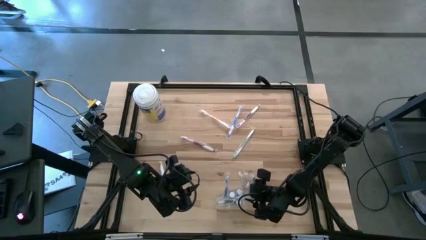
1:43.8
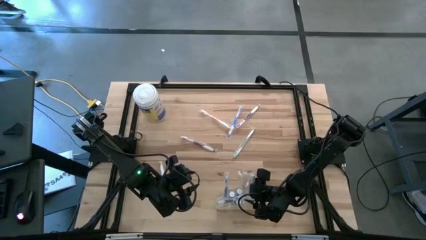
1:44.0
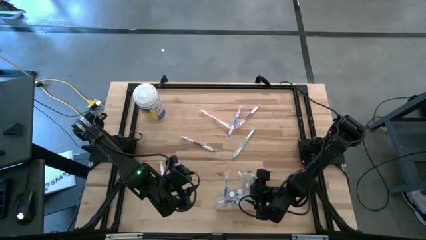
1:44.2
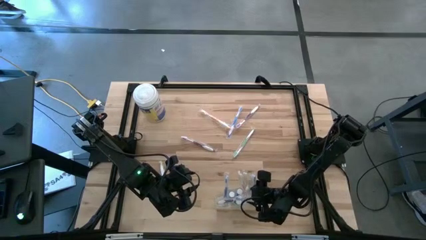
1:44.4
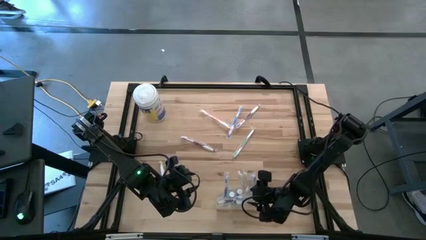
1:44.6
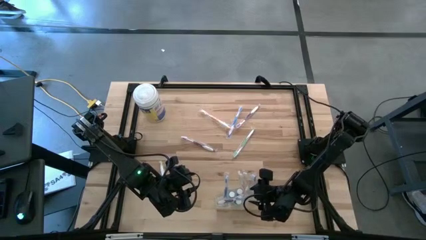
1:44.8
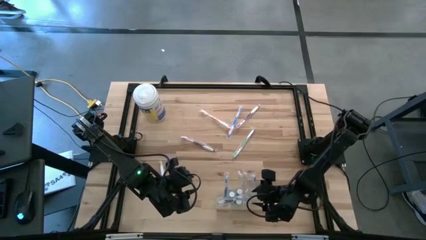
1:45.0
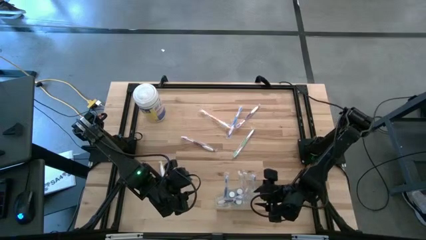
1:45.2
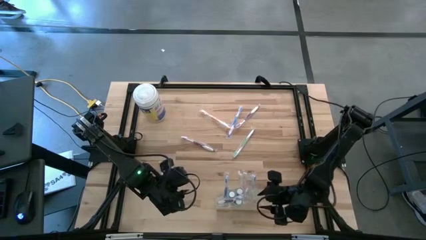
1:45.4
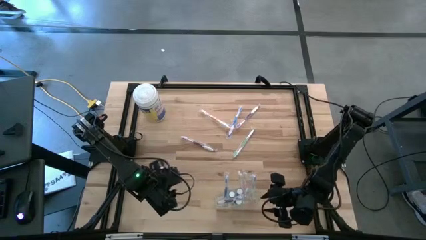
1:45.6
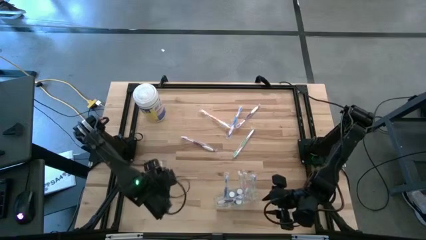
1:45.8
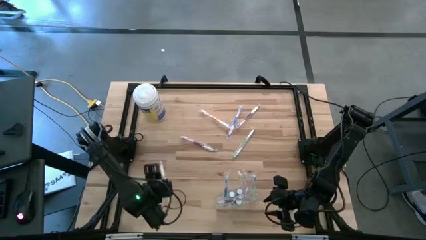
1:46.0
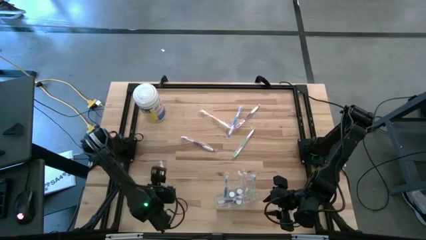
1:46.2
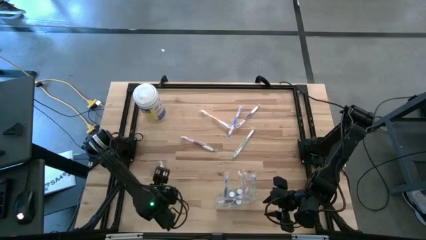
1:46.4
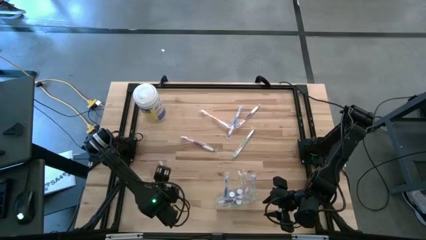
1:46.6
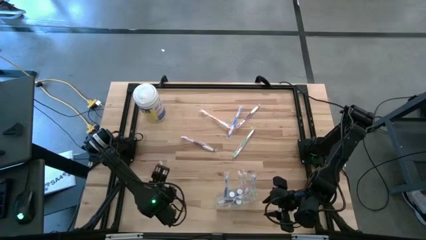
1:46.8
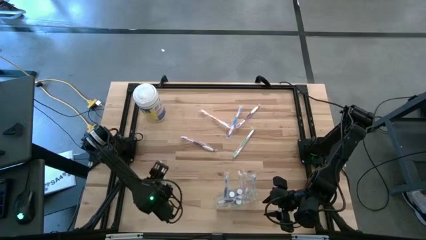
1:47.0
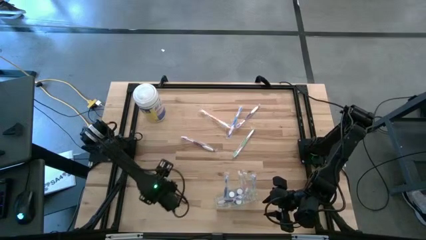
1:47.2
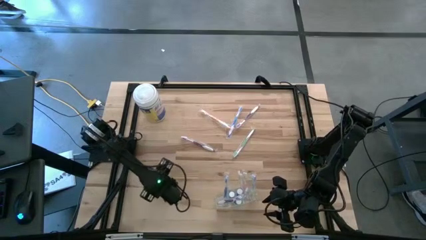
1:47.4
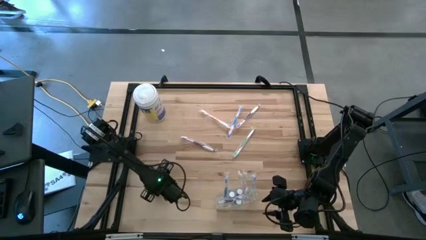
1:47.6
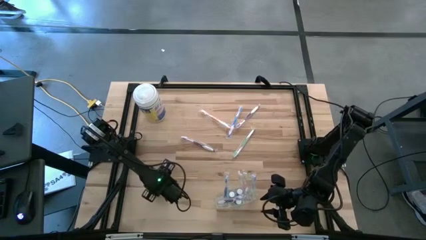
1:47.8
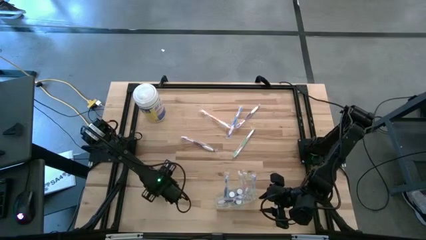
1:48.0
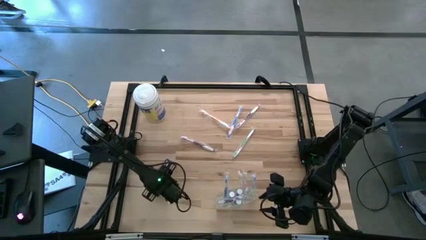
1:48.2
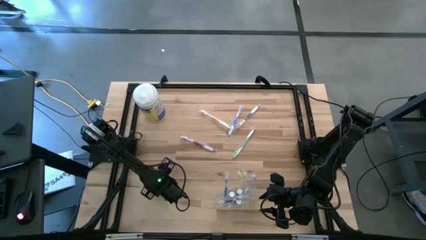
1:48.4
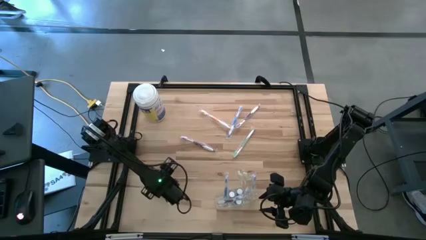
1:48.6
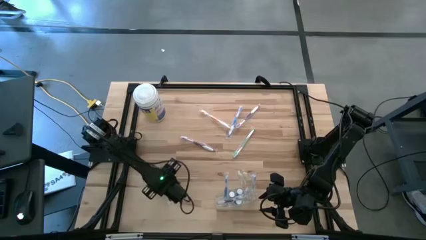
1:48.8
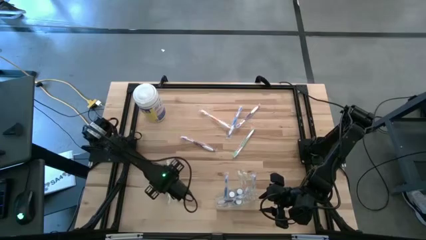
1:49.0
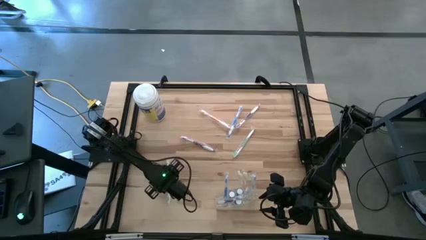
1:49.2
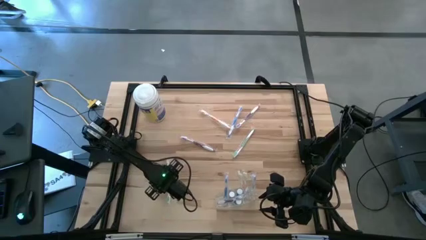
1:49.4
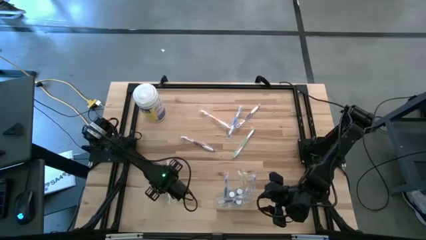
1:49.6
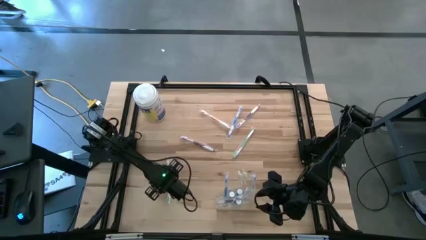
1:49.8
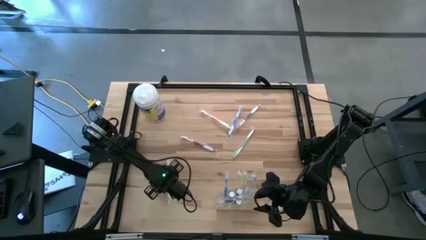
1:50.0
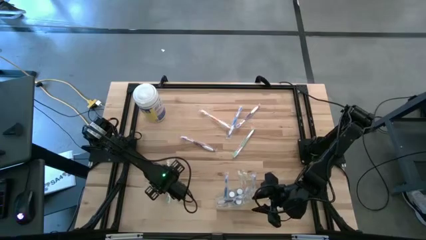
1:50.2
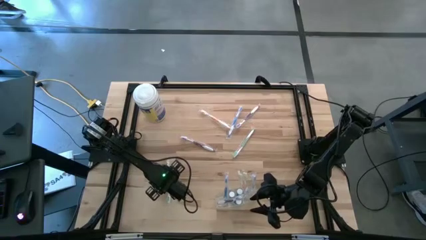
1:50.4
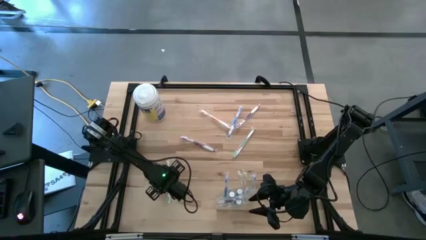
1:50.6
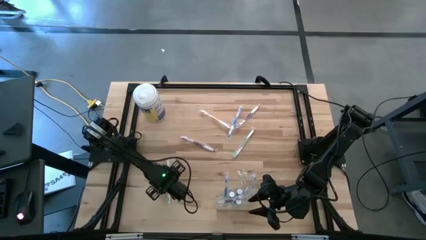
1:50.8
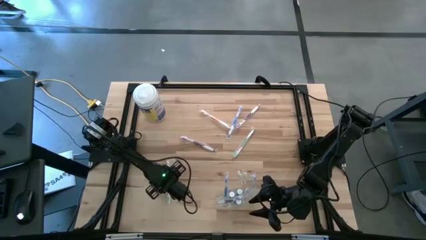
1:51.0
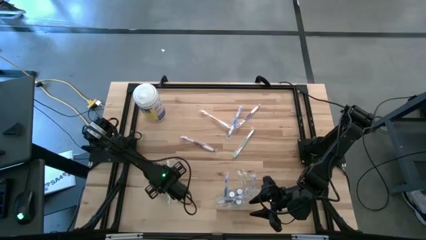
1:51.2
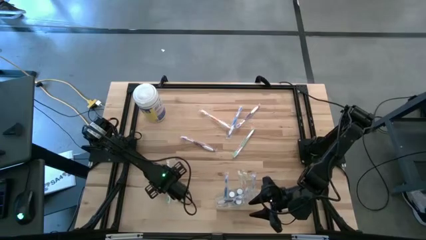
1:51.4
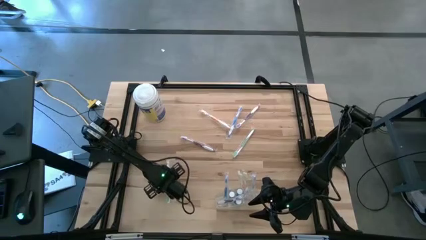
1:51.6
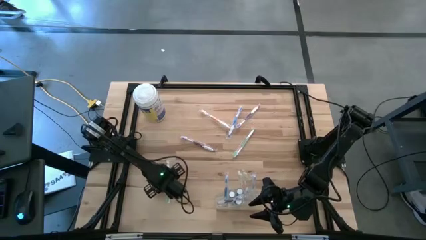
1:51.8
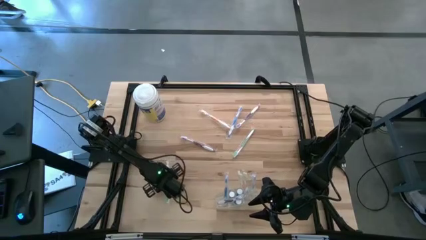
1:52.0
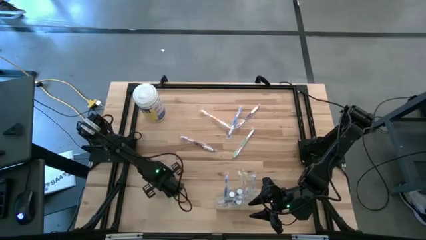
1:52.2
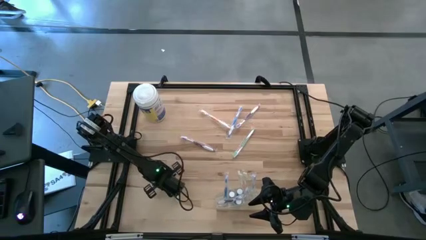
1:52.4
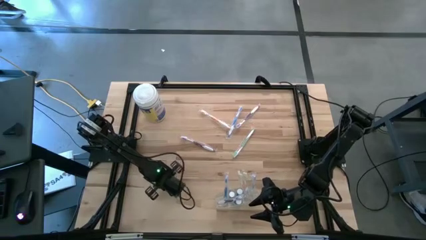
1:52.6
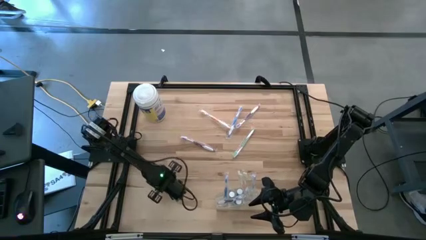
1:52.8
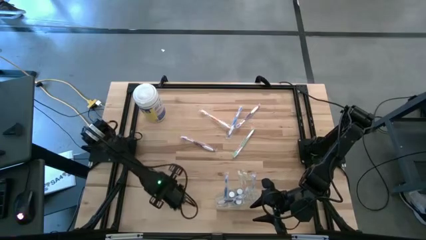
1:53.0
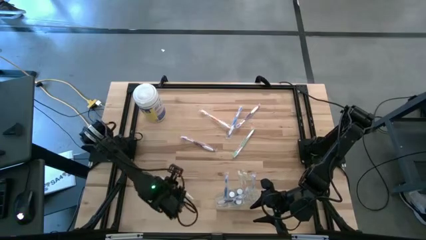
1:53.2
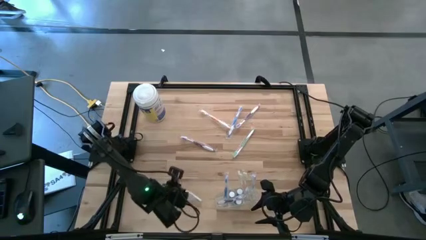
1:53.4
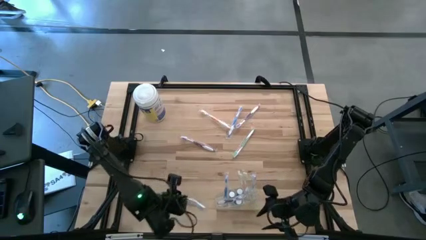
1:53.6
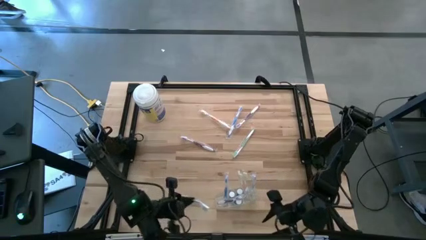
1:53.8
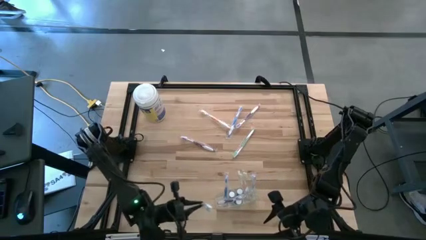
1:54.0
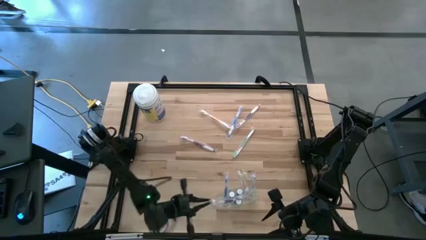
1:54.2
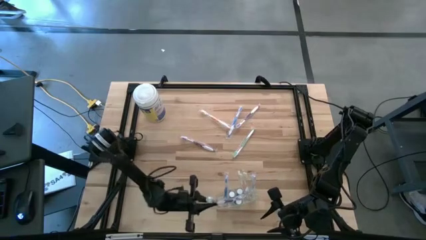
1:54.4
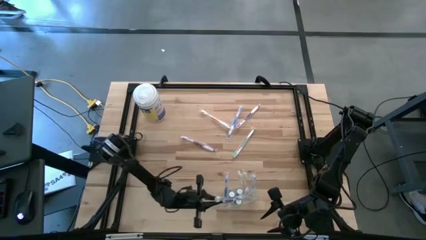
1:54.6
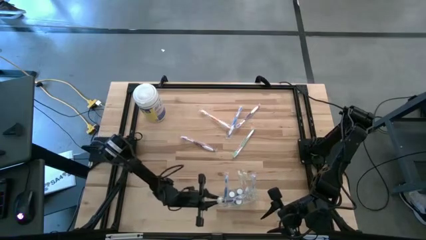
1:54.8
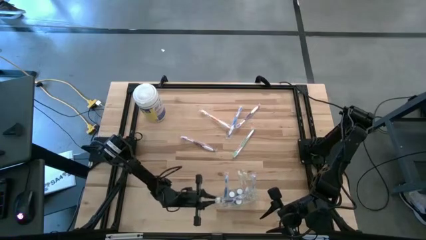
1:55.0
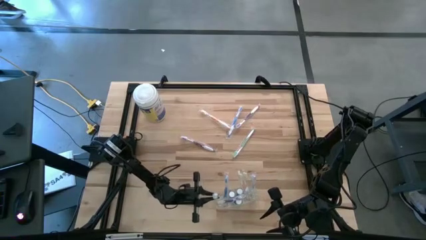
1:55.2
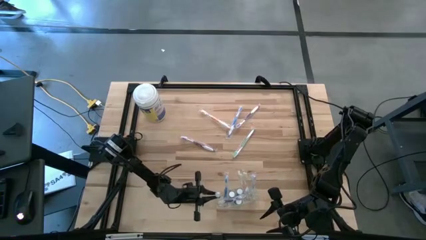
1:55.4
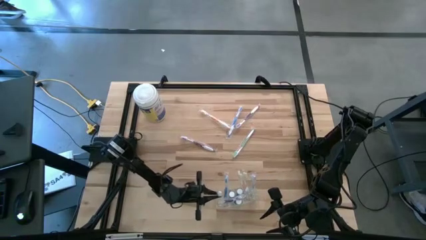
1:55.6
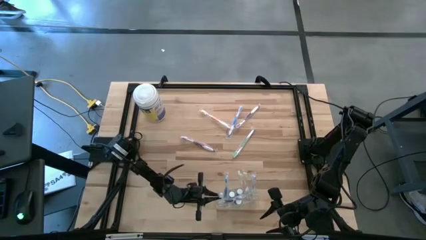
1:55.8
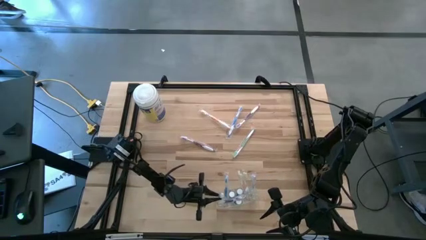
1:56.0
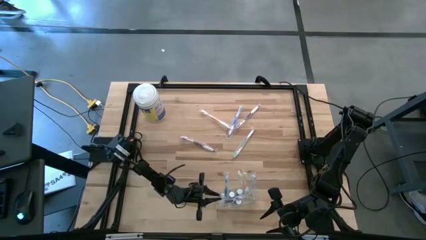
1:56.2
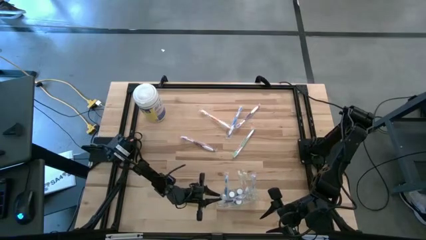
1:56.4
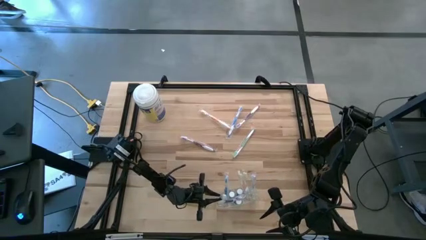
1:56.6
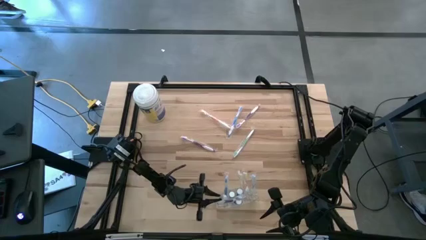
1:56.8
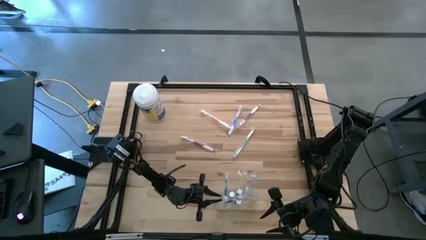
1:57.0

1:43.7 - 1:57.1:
Task: Pick & Place toothbrushing station
Put the left green toothbrush into the transparent bin
